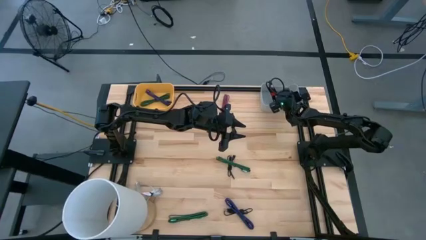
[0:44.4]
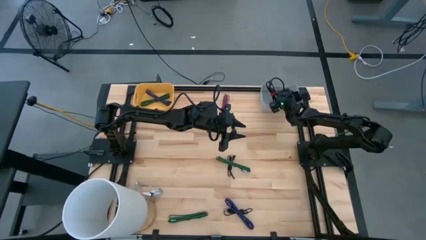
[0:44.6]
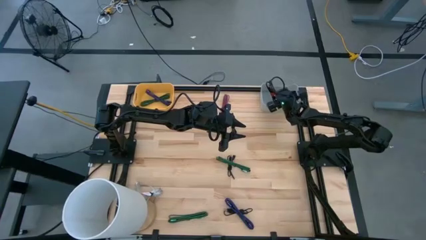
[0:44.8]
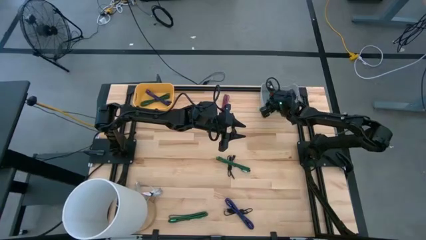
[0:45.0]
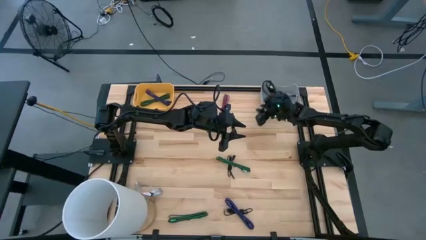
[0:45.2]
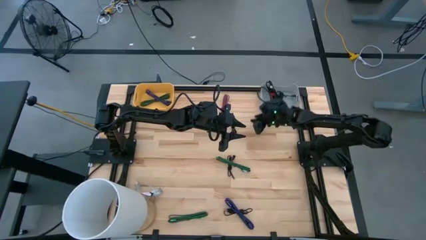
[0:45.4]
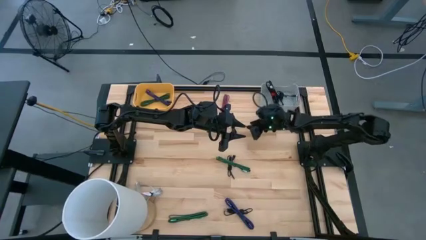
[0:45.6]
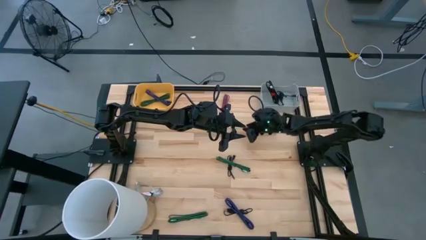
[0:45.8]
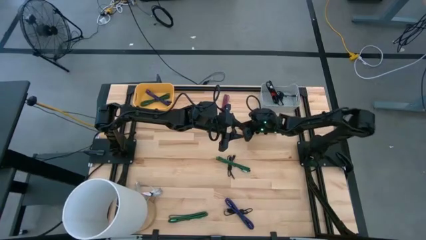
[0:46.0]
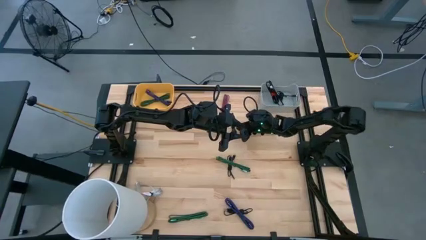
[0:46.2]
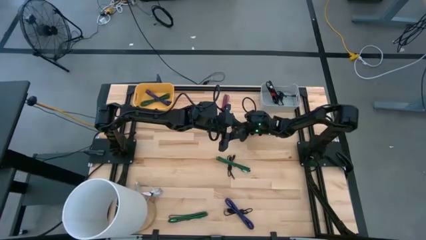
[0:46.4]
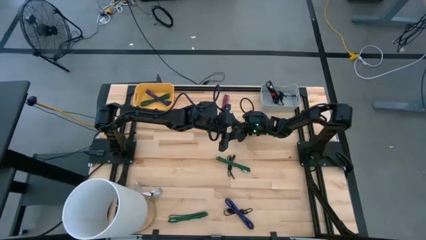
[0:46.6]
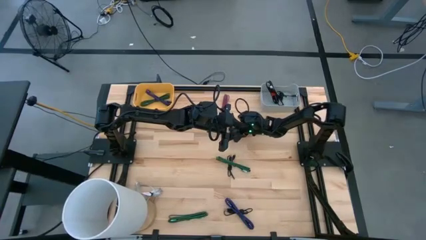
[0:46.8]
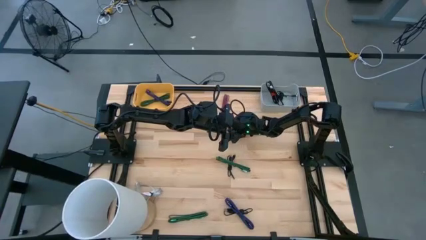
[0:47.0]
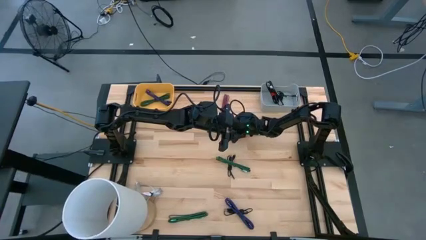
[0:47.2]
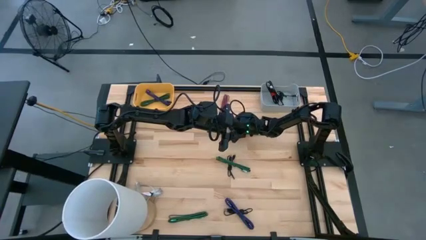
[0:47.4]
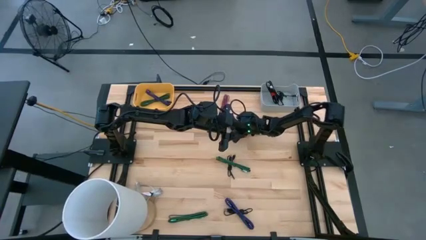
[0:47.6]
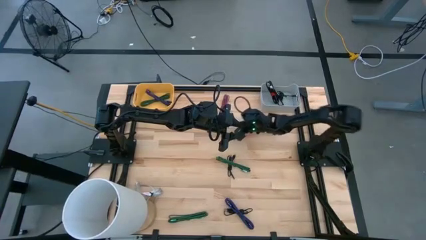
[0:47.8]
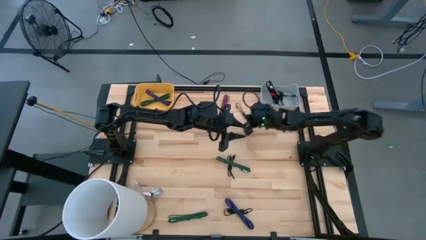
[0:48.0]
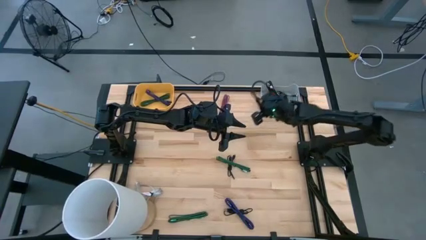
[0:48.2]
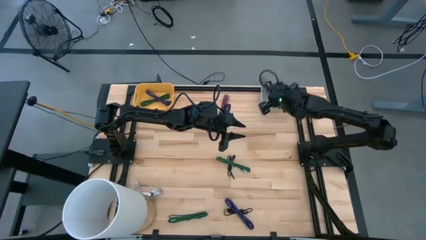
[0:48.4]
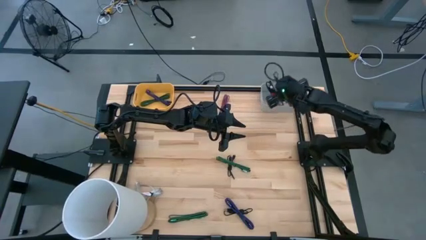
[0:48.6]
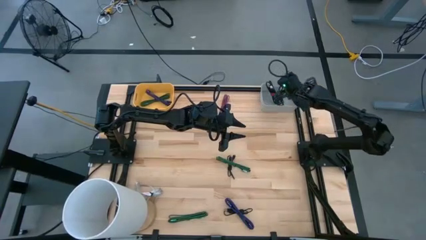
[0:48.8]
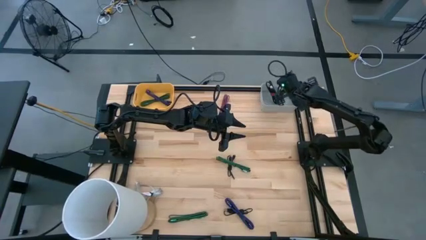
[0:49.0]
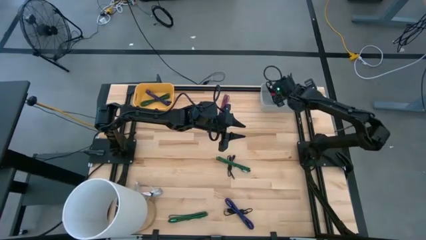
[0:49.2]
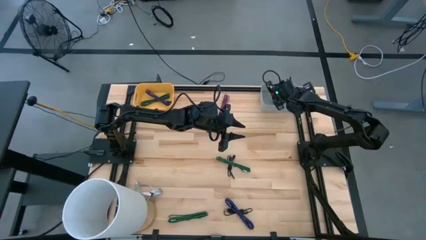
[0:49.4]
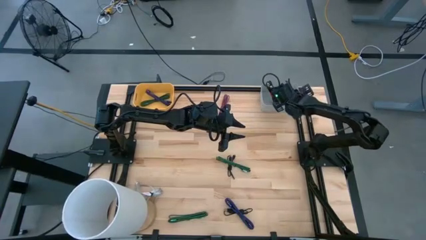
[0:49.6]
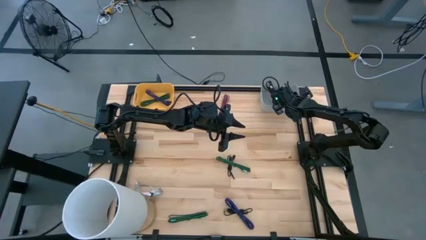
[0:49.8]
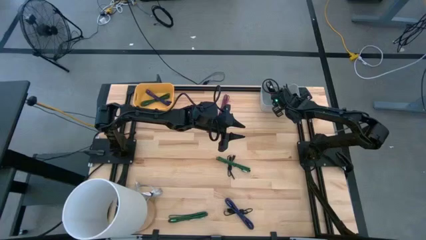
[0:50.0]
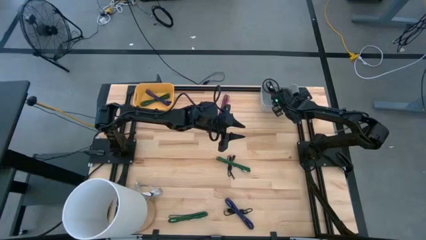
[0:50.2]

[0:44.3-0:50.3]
Task: Pick & Place USB Port
Put the black charger cable into the gray bin

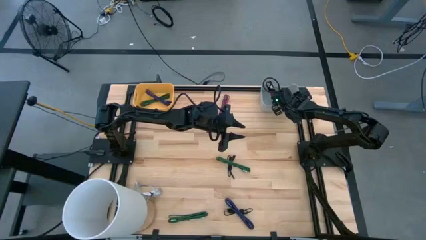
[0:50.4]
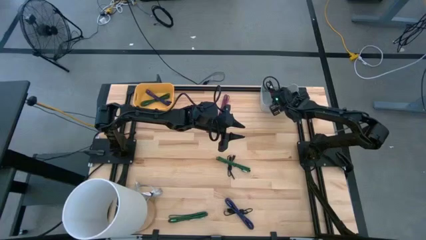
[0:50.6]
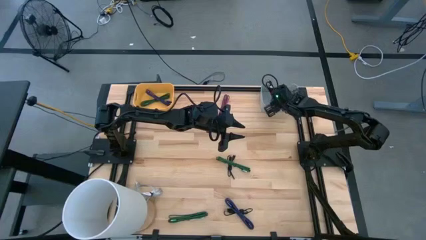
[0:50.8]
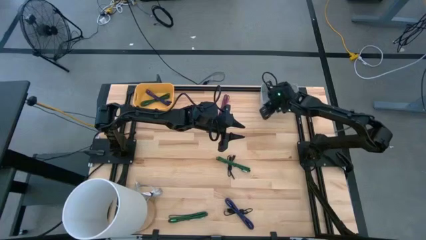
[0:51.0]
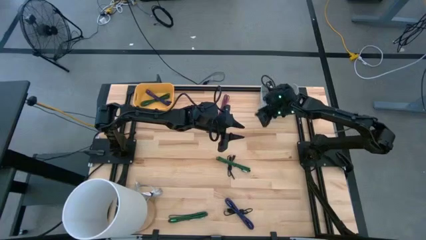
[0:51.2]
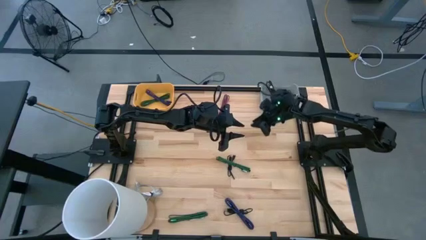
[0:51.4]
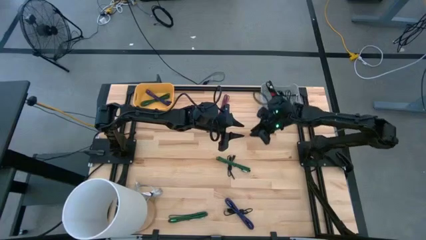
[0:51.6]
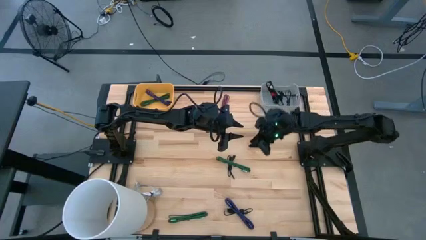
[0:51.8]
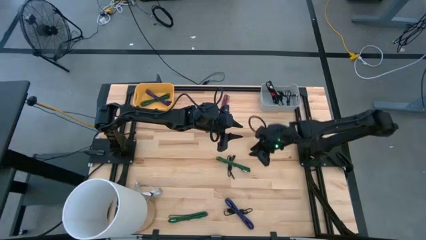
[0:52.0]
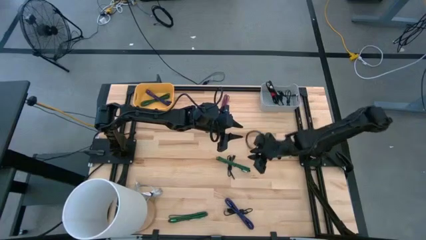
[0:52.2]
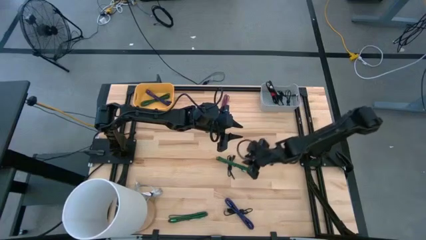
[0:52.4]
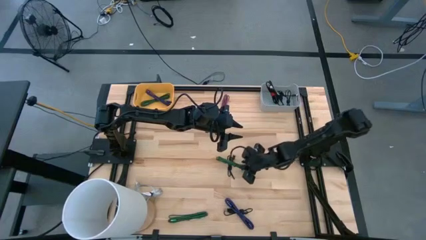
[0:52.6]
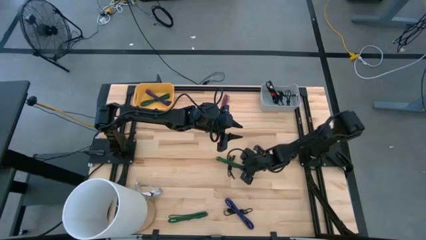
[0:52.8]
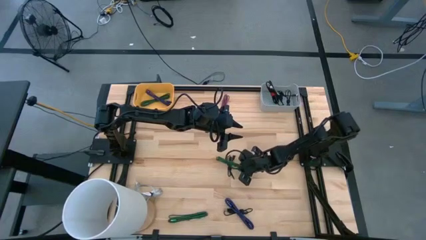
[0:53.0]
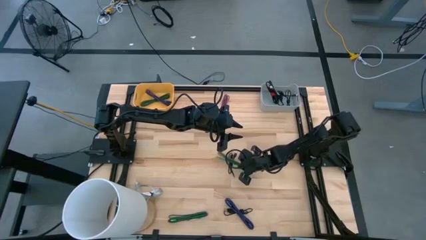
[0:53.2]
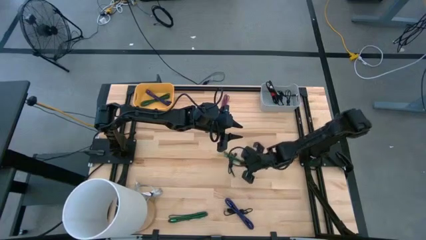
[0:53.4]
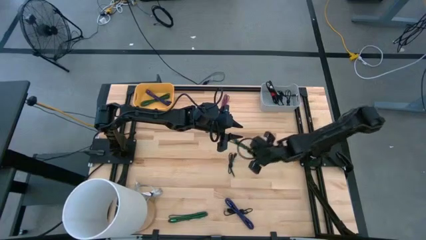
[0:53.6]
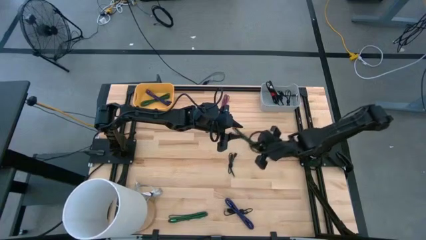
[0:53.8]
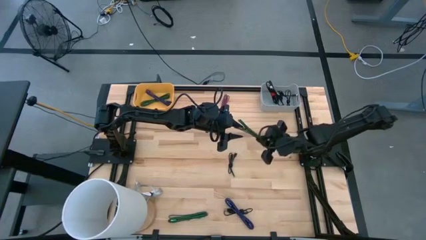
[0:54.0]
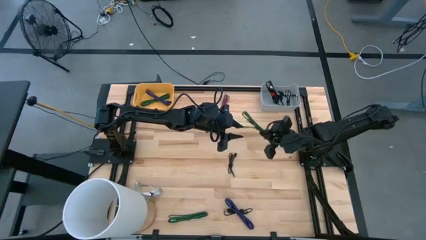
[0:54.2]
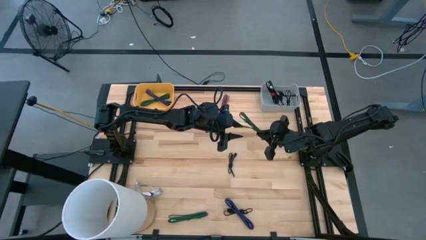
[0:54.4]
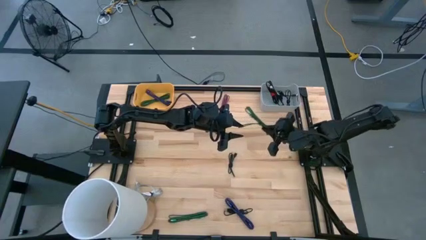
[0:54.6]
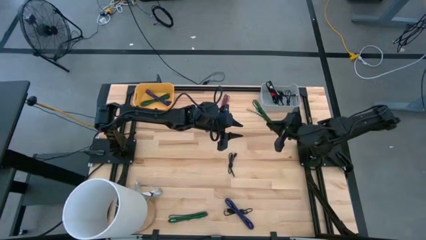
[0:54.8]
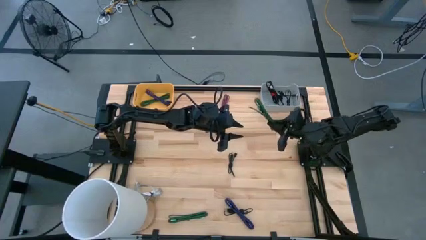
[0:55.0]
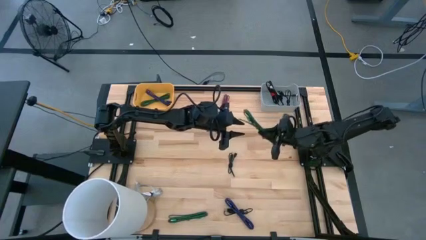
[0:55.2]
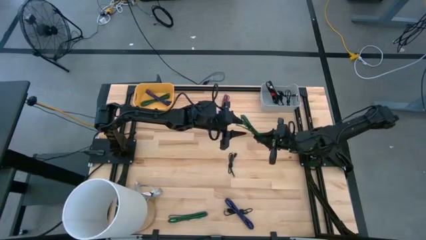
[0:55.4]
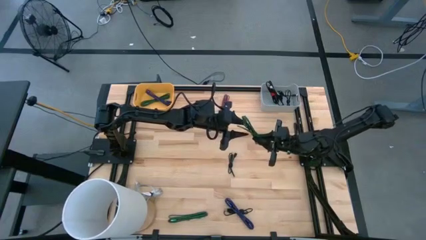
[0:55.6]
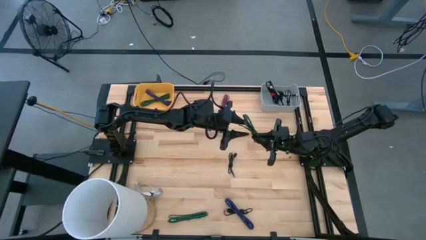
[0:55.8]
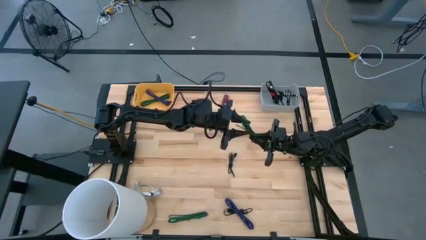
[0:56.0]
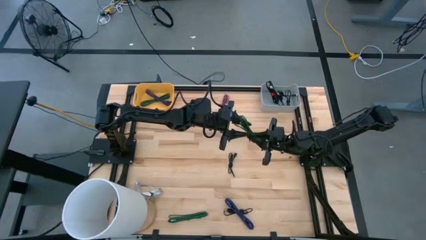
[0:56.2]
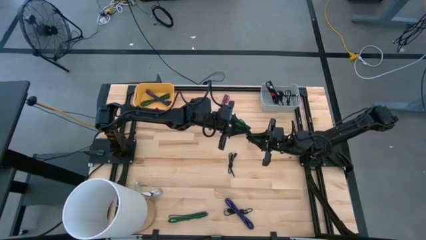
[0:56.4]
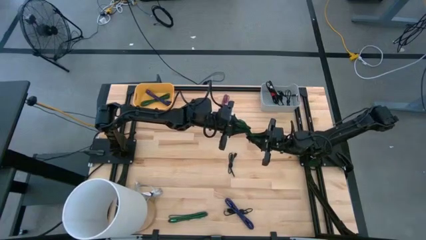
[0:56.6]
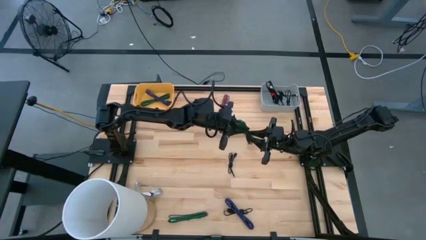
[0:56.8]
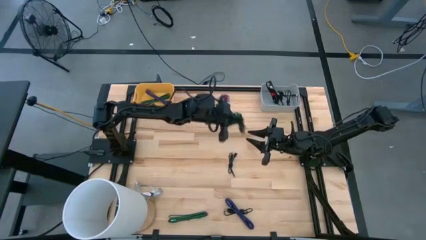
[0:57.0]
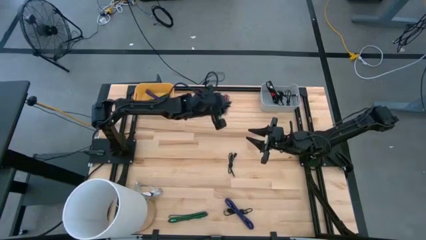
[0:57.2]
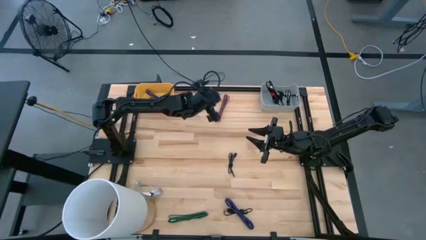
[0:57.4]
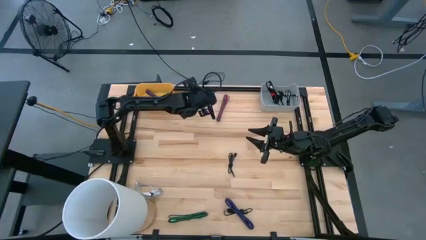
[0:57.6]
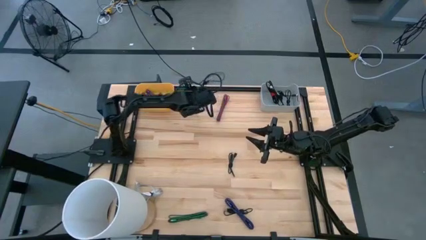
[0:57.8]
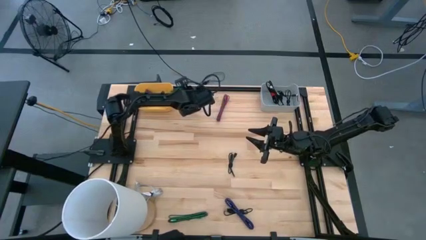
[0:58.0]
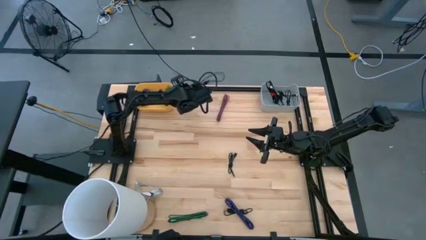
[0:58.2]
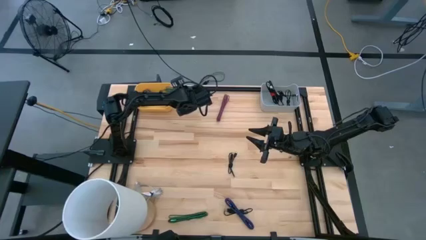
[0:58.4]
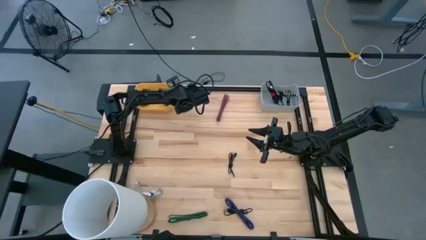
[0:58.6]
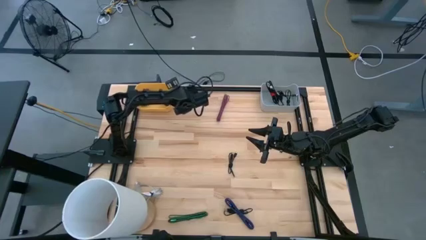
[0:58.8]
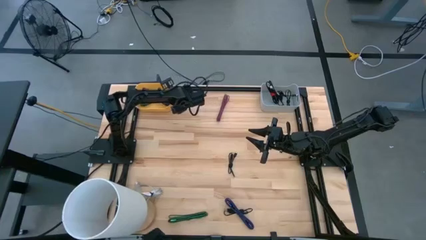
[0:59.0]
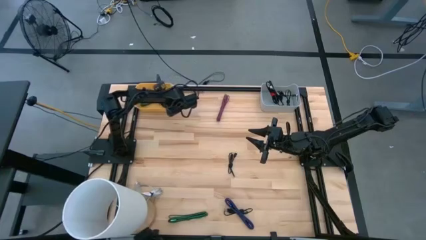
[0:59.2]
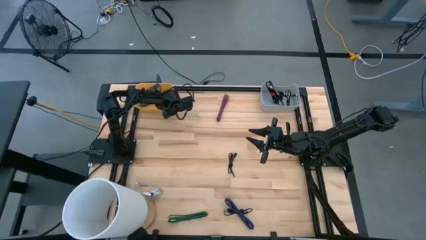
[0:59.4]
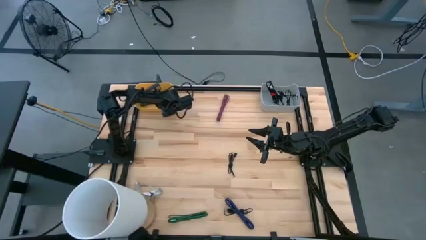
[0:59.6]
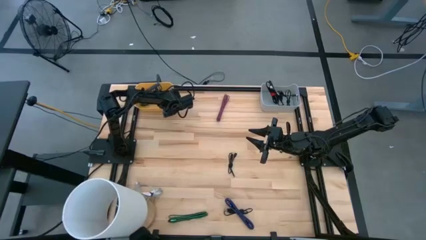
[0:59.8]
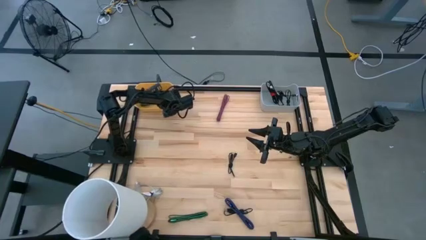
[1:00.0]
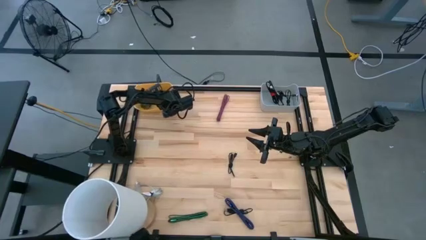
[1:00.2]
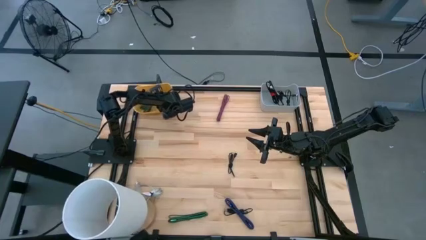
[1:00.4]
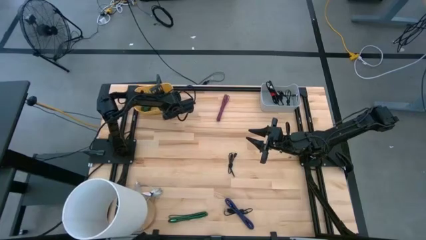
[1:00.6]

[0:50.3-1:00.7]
Put the green charger cable into the yellow bin
